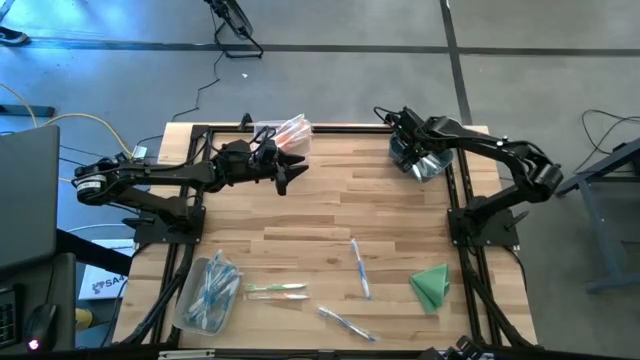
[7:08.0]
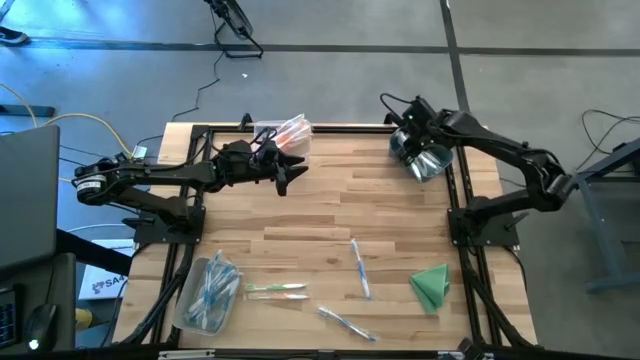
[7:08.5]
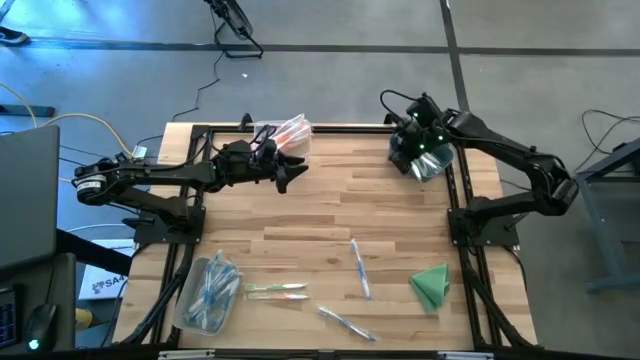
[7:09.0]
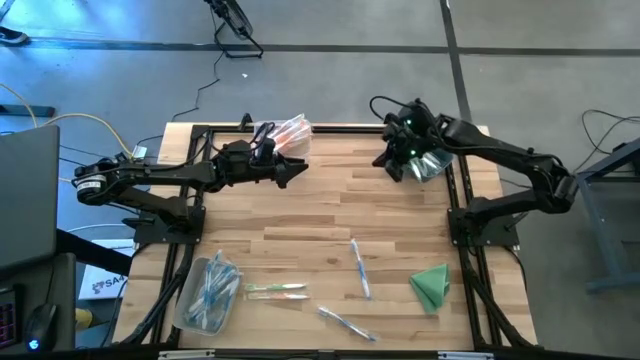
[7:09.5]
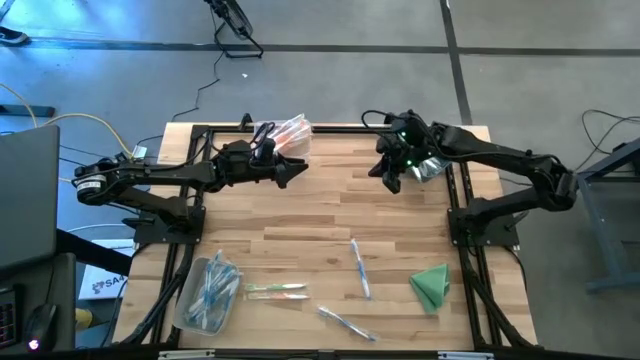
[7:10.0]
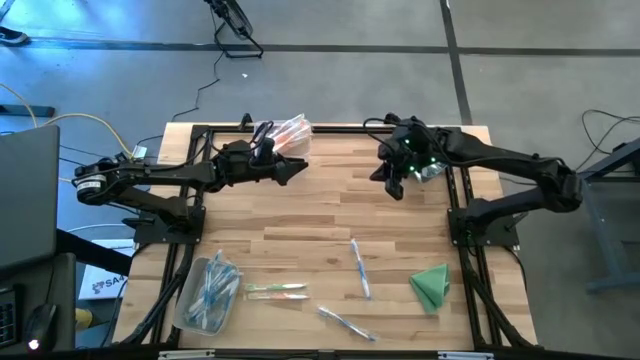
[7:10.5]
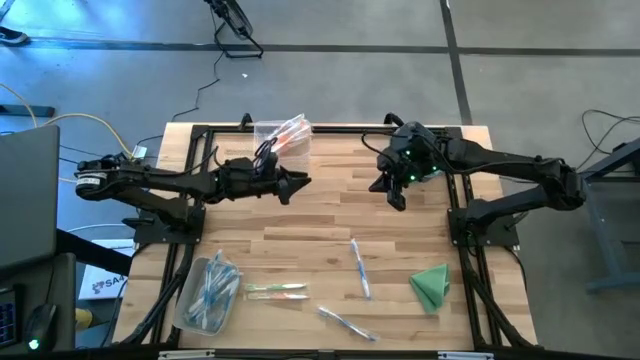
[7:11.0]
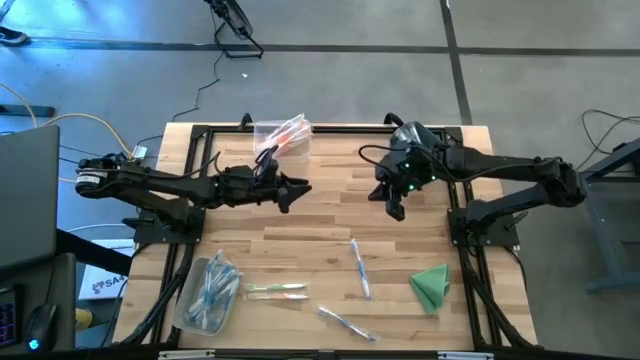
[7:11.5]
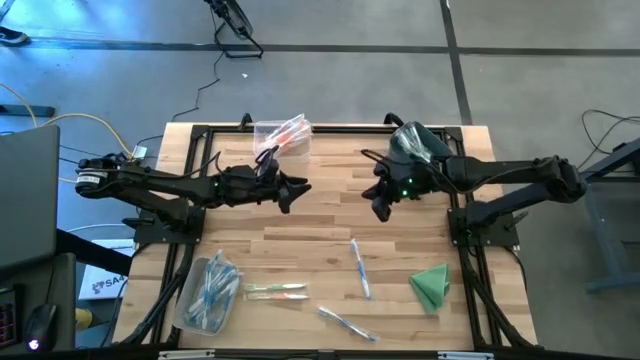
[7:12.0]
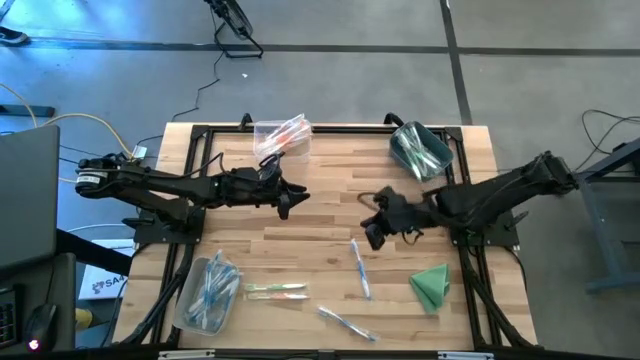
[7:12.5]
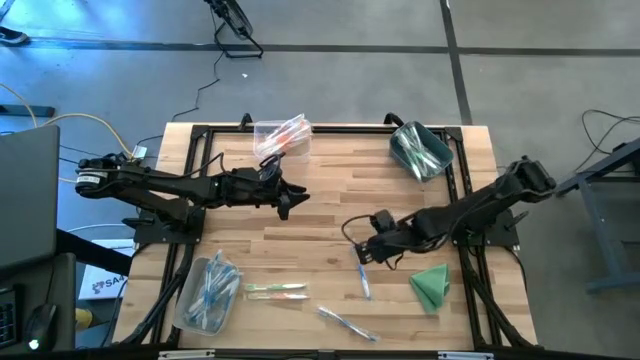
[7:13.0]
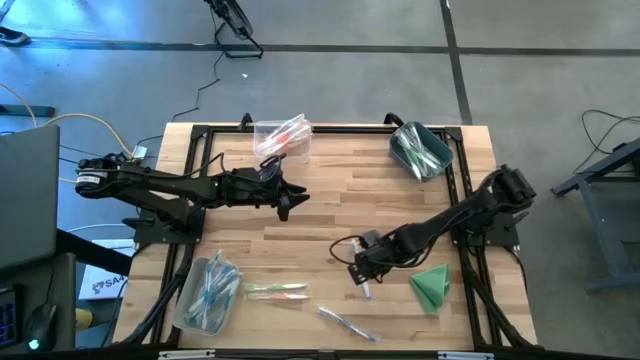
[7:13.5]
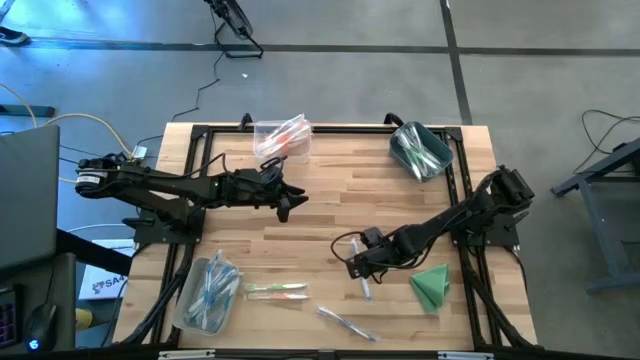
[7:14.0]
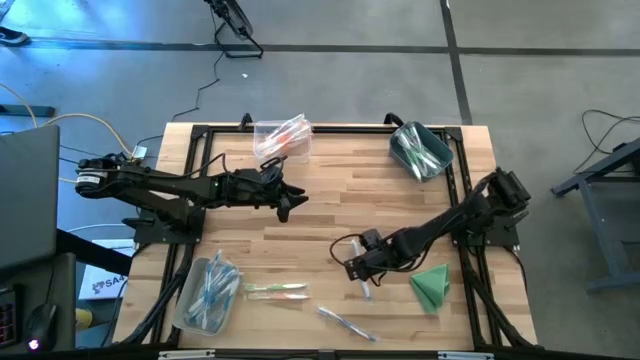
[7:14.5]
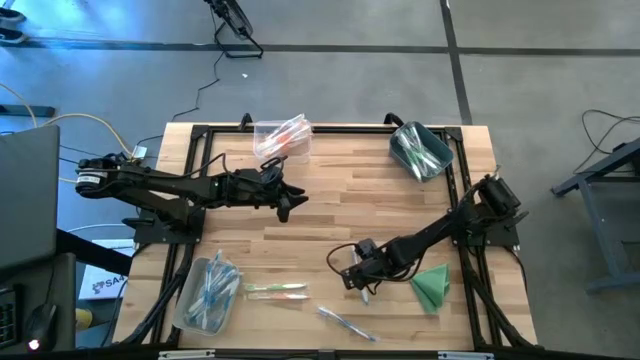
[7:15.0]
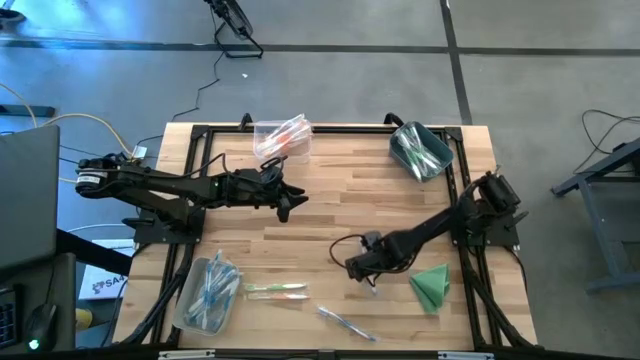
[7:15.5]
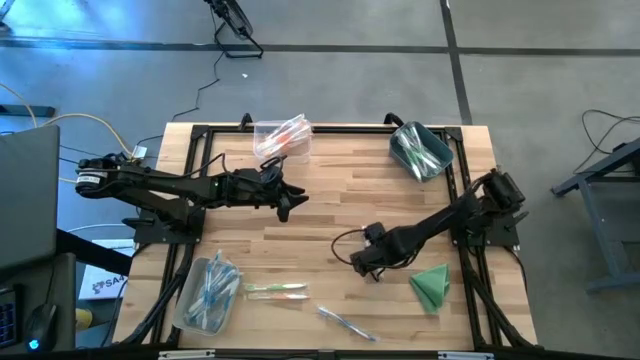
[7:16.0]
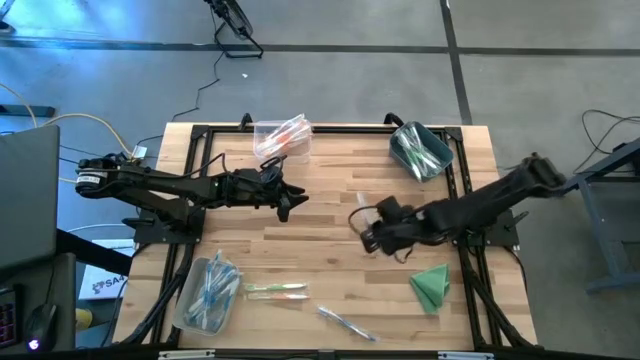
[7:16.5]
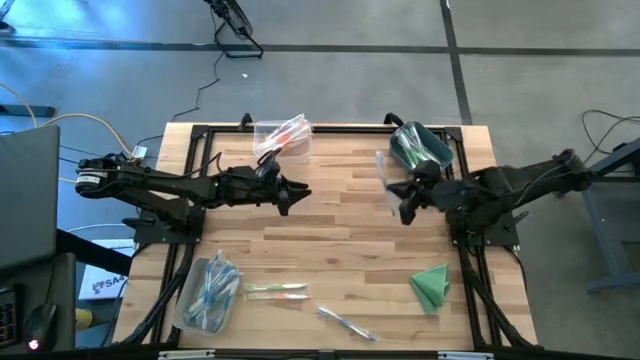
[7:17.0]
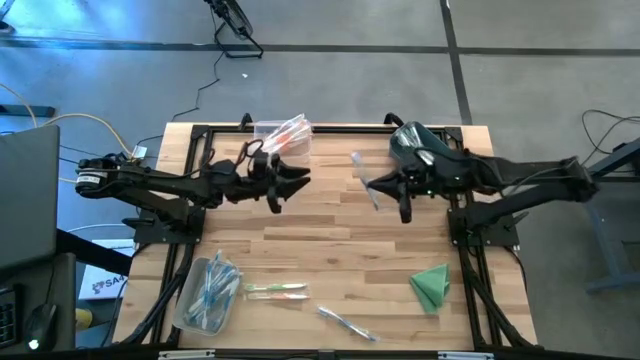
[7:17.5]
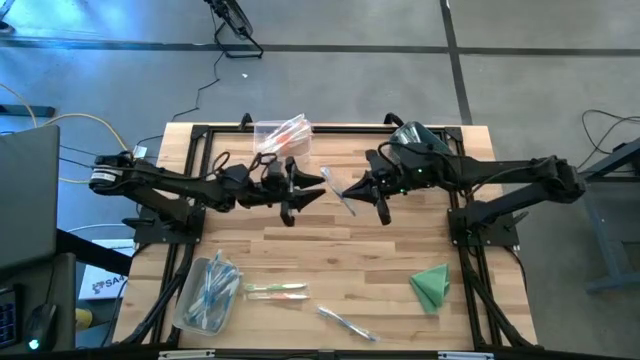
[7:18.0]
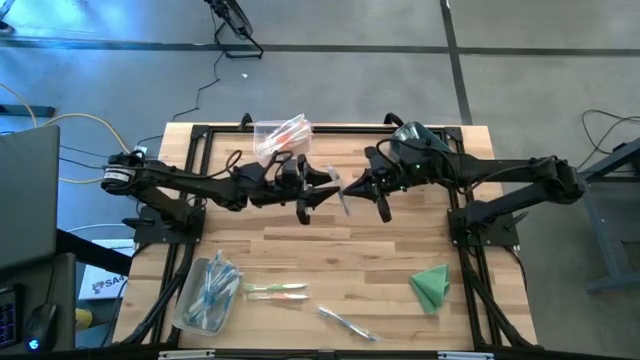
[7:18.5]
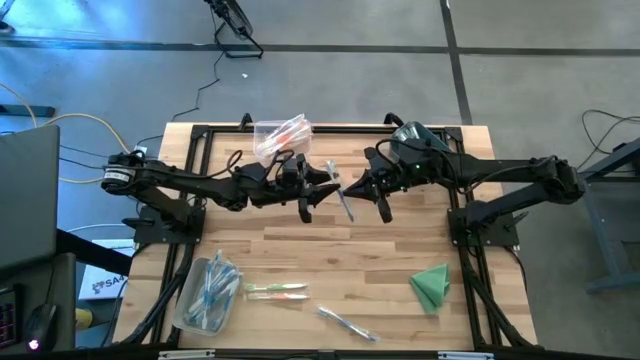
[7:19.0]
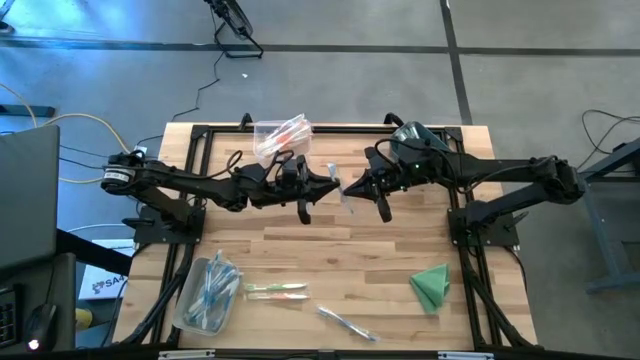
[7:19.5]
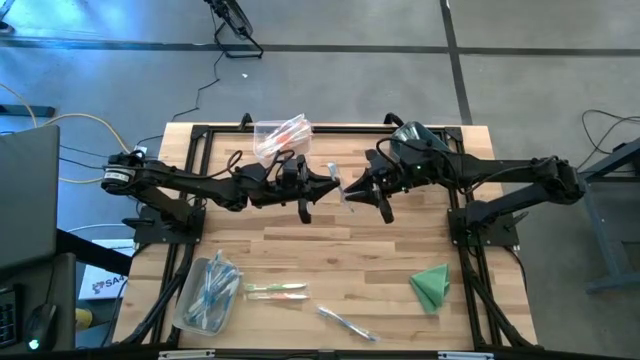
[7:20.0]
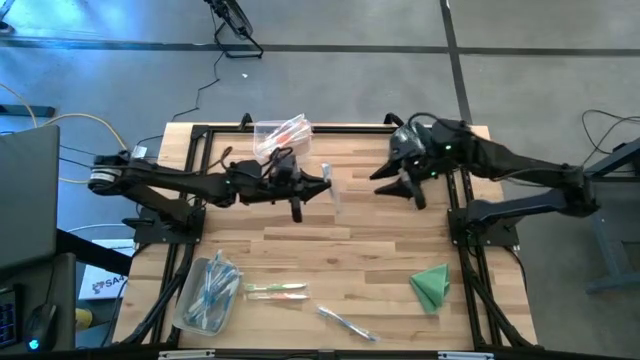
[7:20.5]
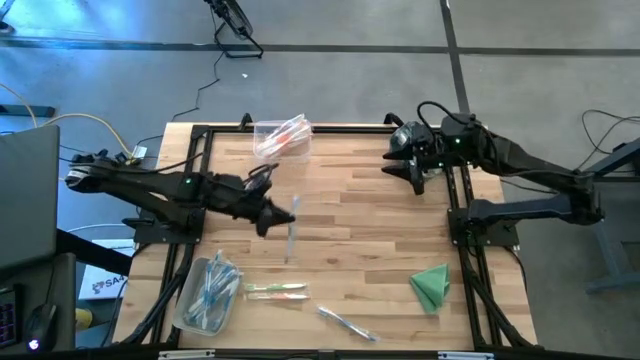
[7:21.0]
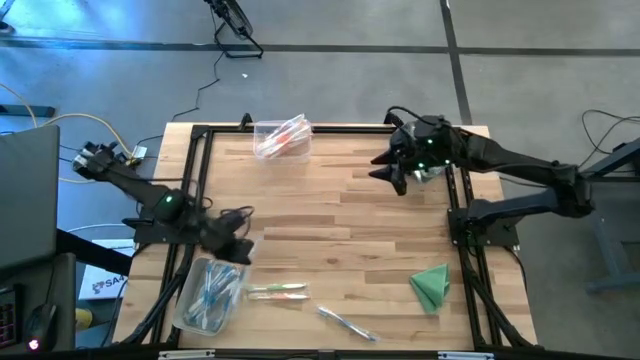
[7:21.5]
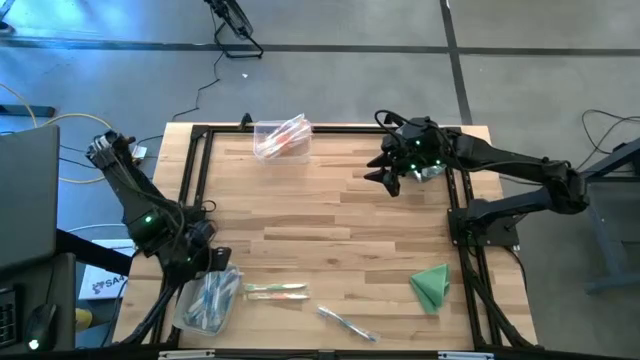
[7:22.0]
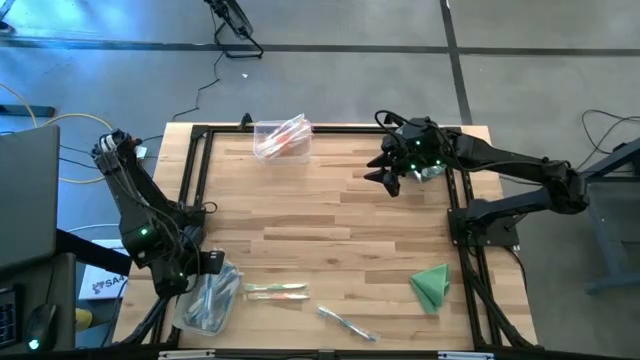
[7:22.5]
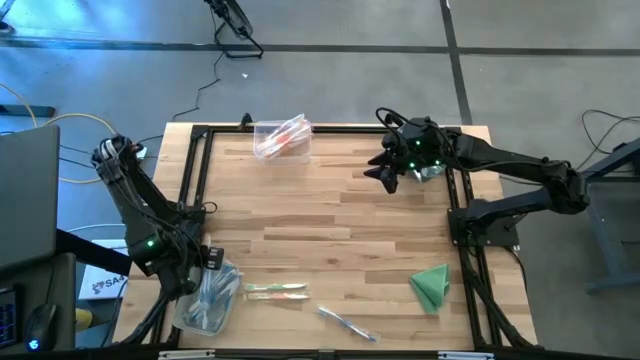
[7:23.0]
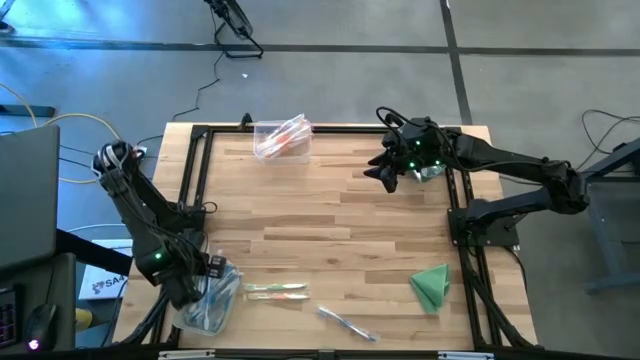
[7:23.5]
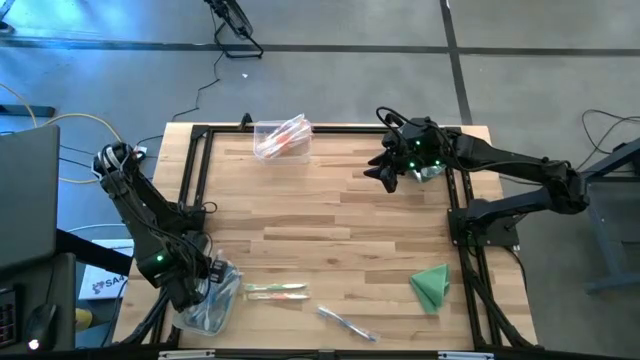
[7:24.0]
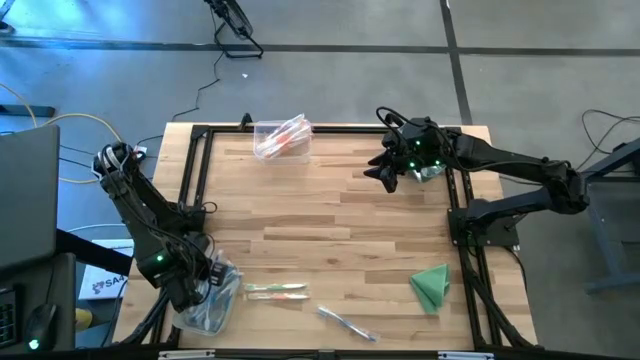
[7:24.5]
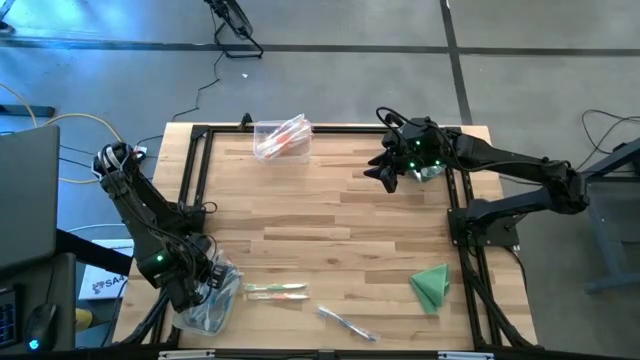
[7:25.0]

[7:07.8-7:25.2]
Task: Pick & Place Toothbrushes
Put the top blue toothbrush into the gray bin
